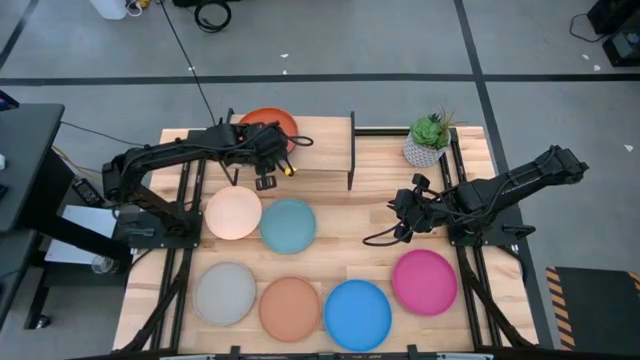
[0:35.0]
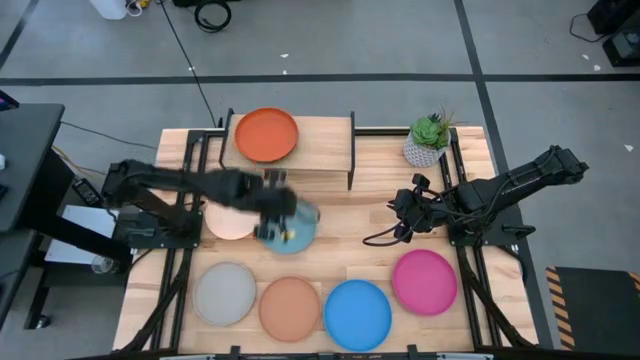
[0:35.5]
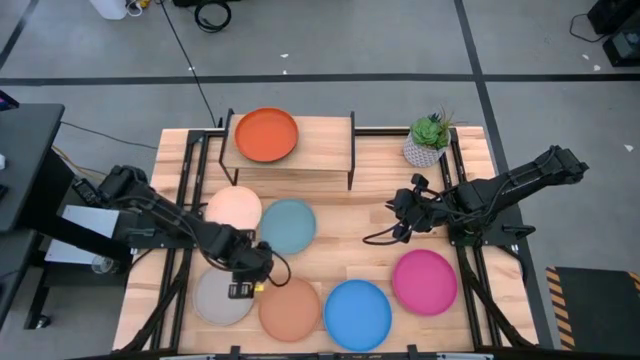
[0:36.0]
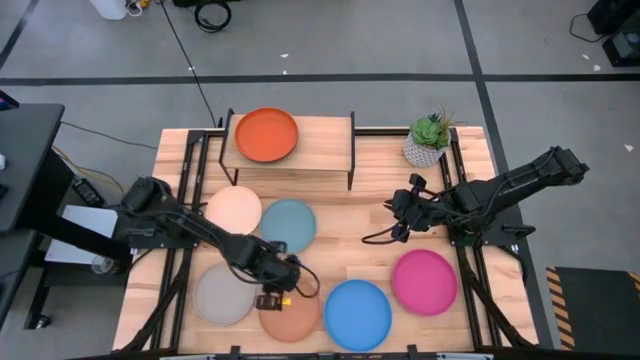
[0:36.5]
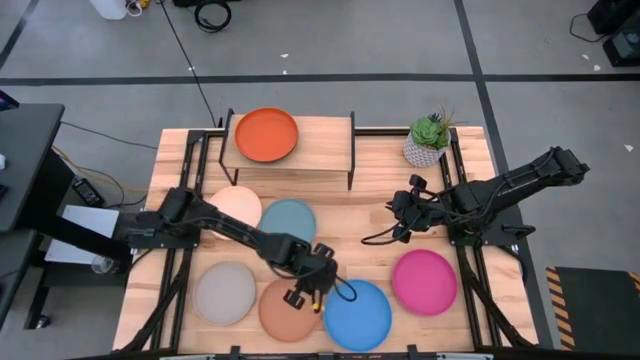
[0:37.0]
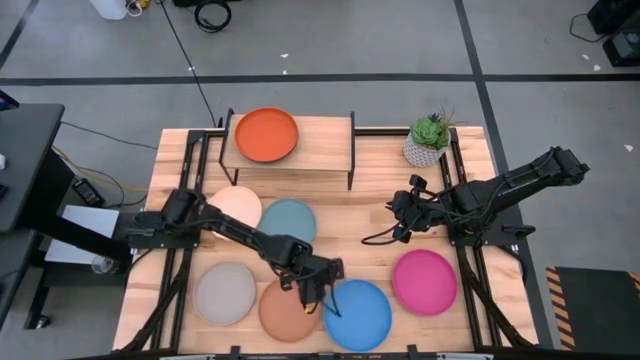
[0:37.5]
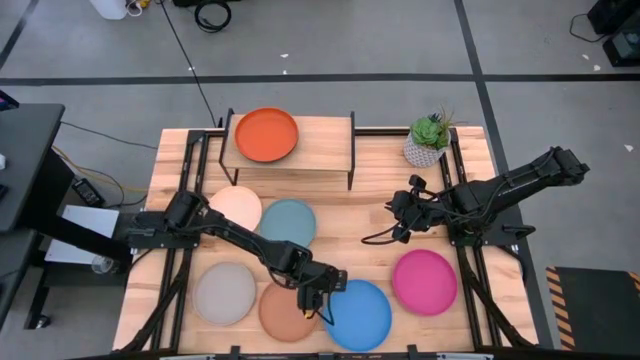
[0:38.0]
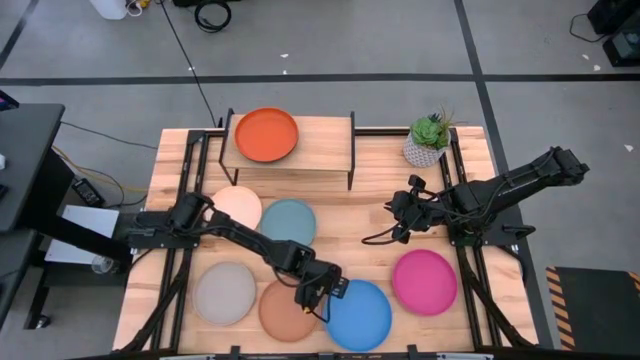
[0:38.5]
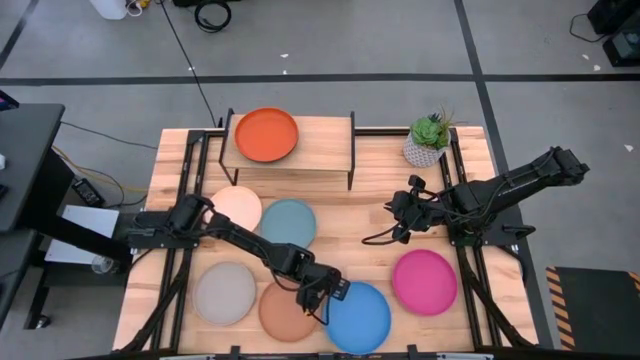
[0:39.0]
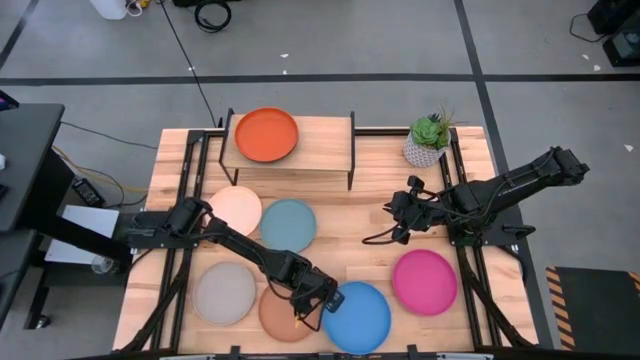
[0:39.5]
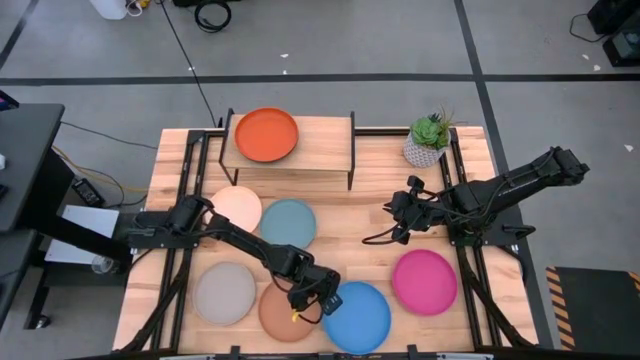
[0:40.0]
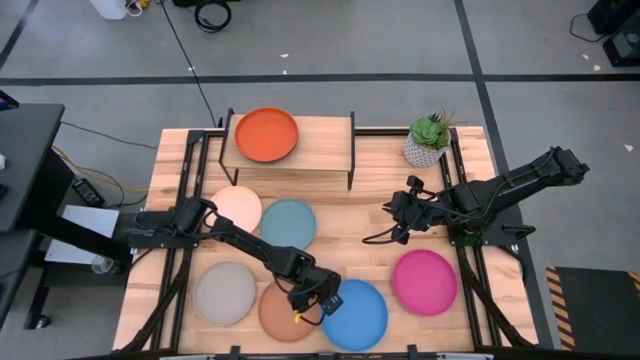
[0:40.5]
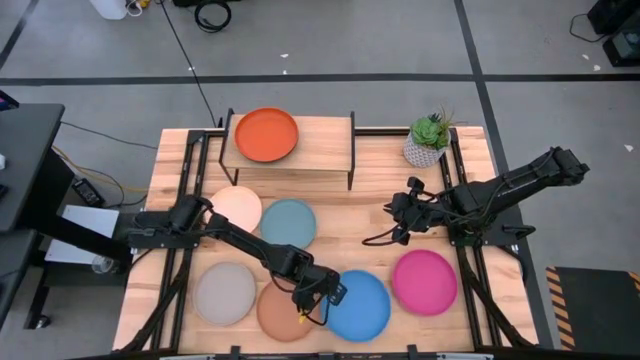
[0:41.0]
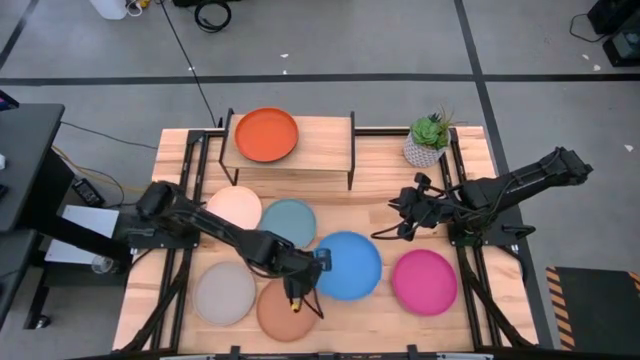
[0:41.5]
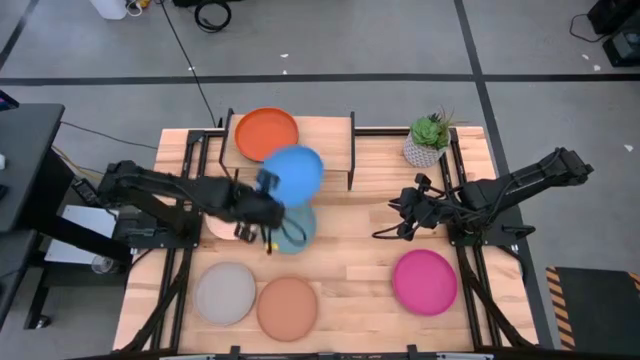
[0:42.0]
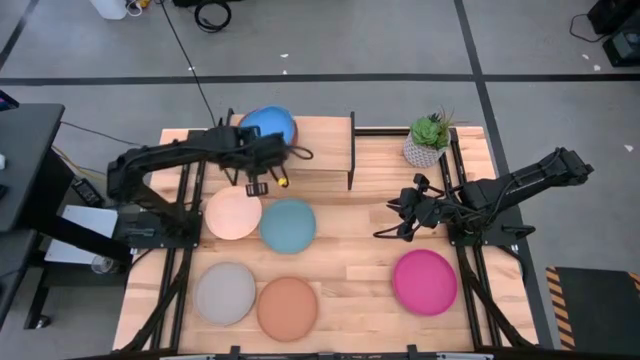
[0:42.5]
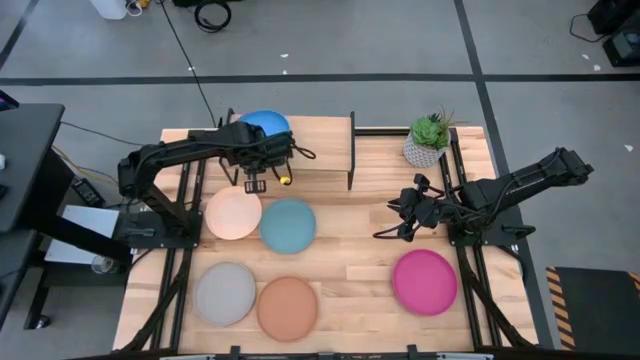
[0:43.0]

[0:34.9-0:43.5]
Task: Place and stack plates onto a shelf
Stack the blue plate on the orange plate on the shelf

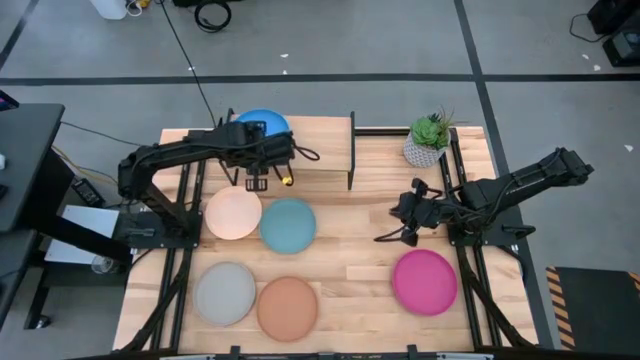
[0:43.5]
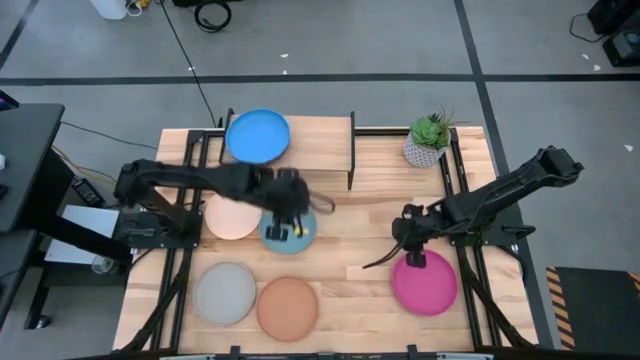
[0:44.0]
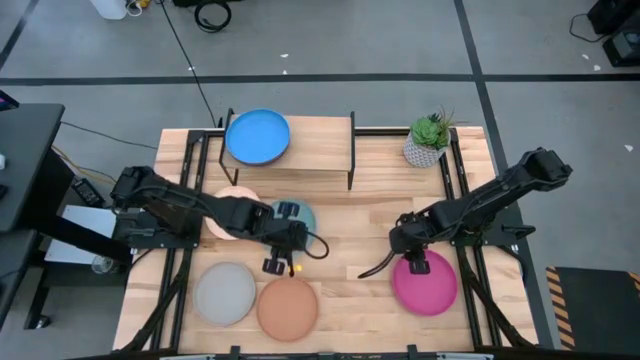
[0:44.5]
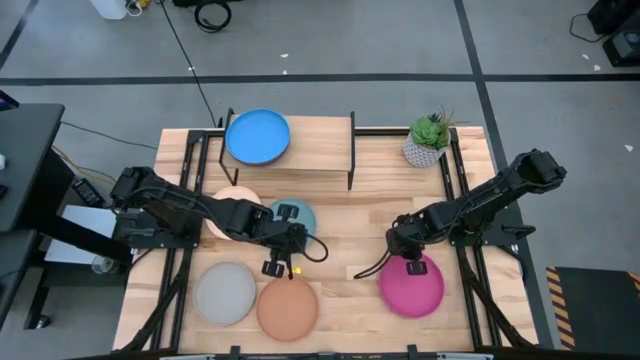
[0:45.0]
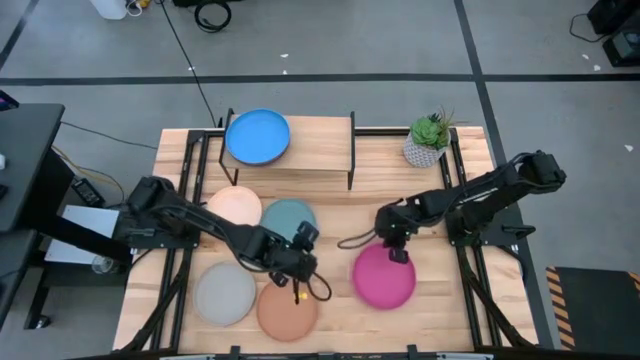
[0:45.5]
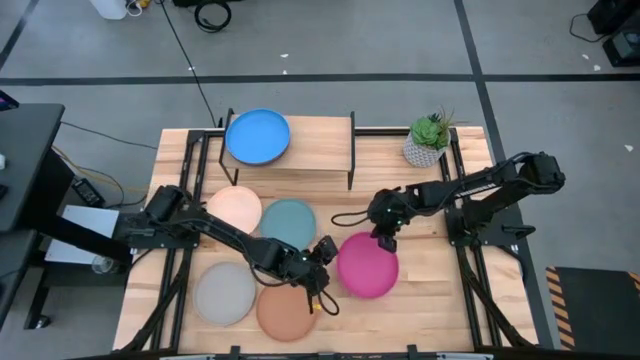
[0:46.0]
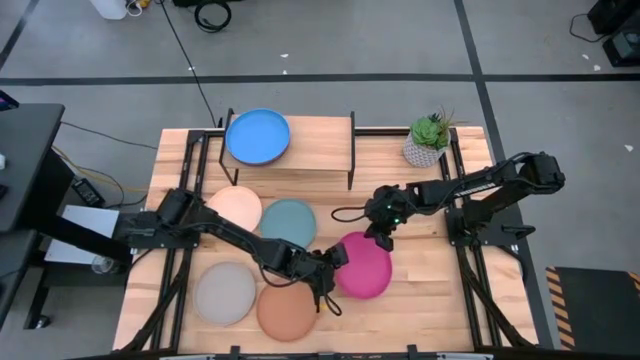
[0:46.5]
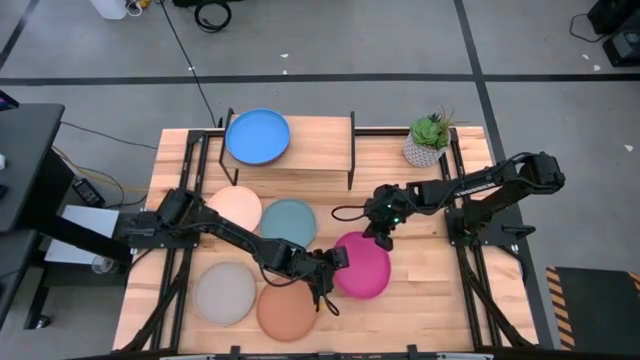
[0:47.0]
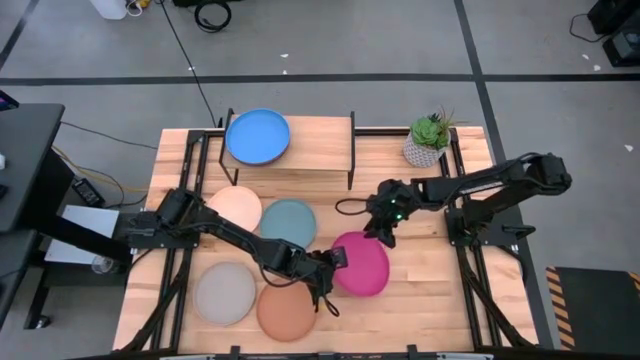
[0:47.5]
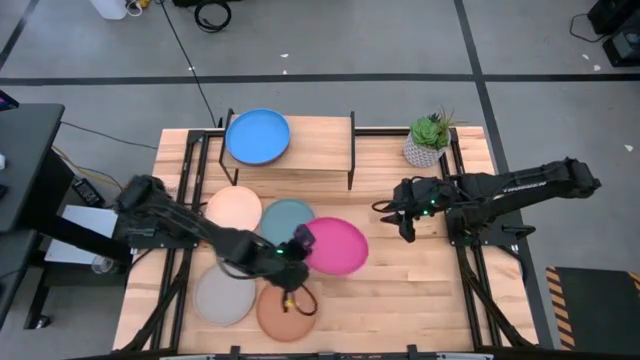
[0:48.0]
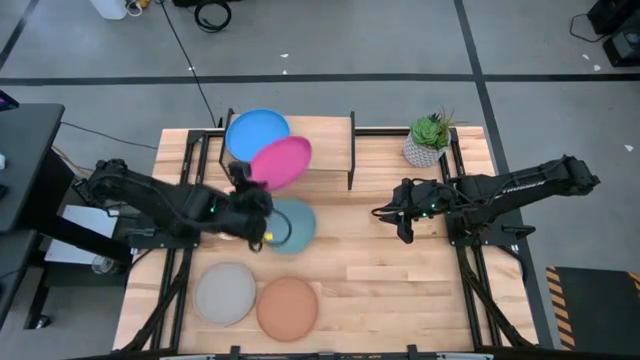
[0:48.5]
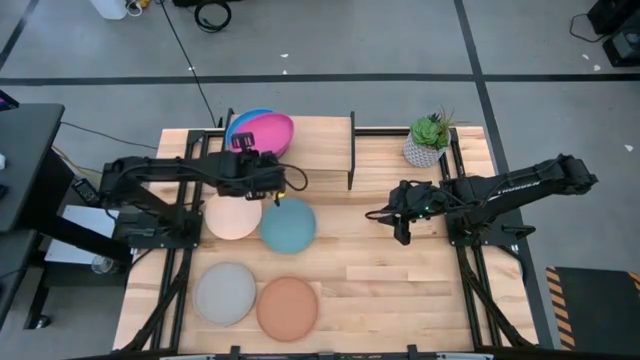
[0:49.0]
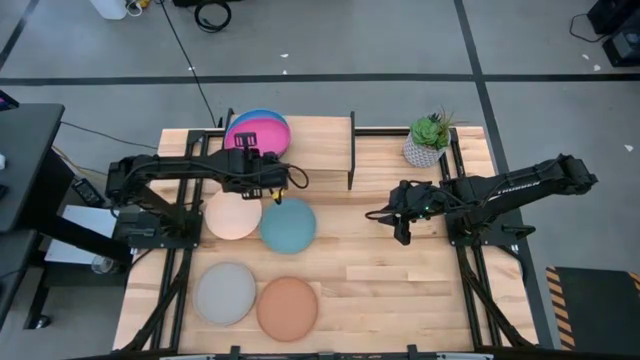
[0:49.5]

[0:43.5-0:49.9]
Stack the pink plate on the blue plate on the shelf

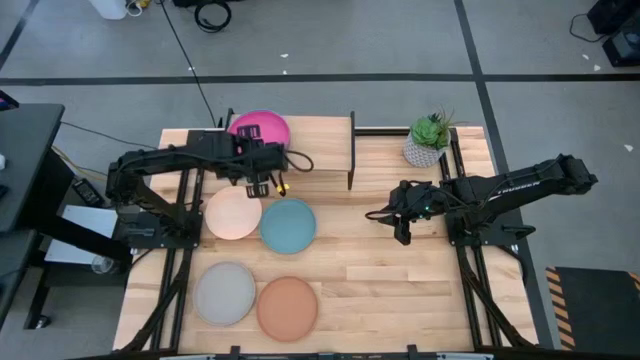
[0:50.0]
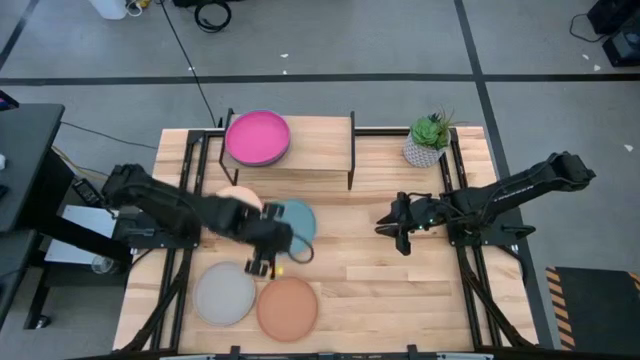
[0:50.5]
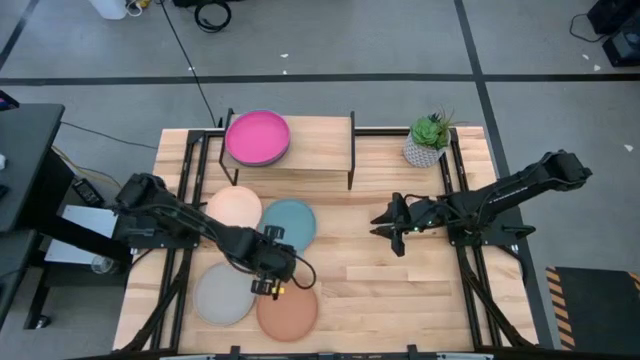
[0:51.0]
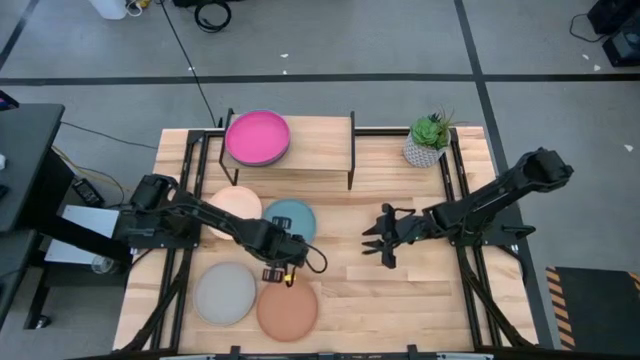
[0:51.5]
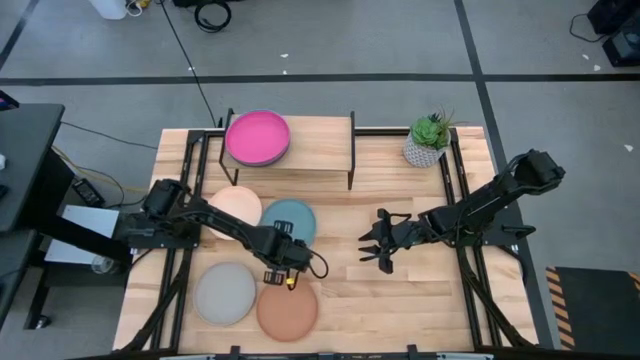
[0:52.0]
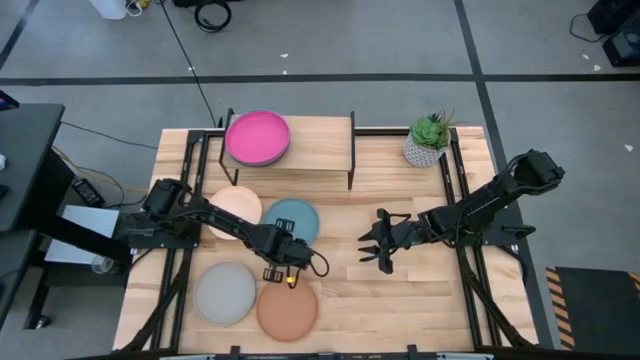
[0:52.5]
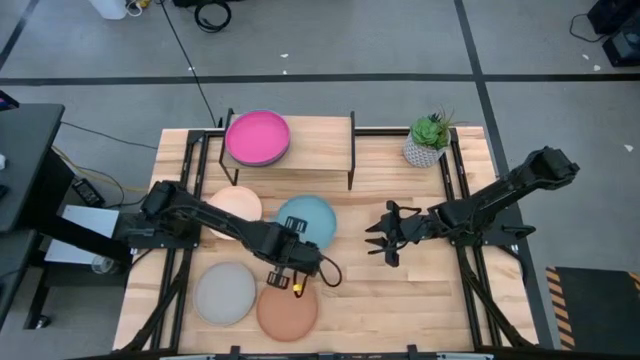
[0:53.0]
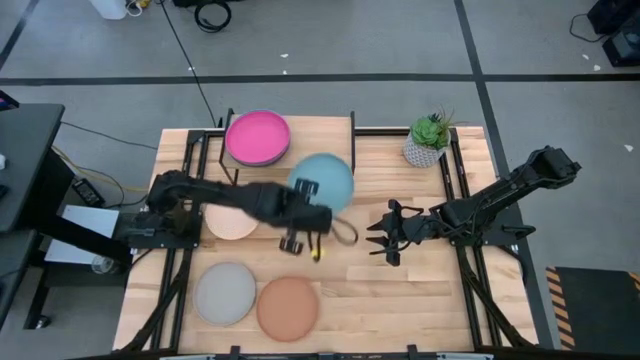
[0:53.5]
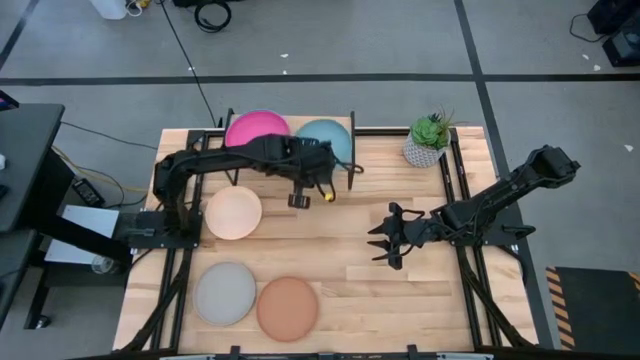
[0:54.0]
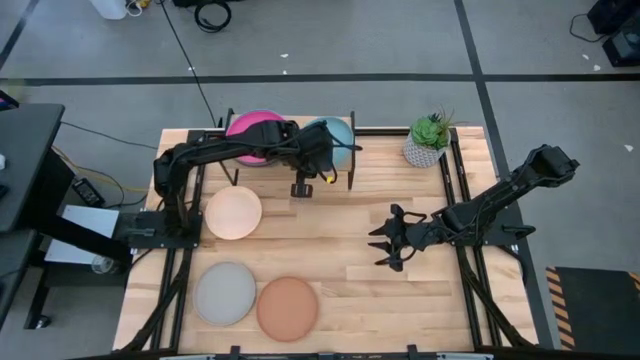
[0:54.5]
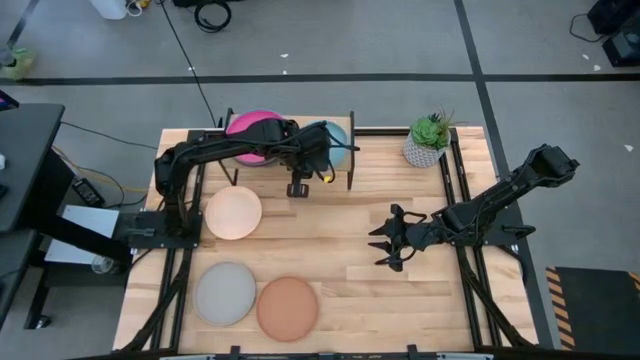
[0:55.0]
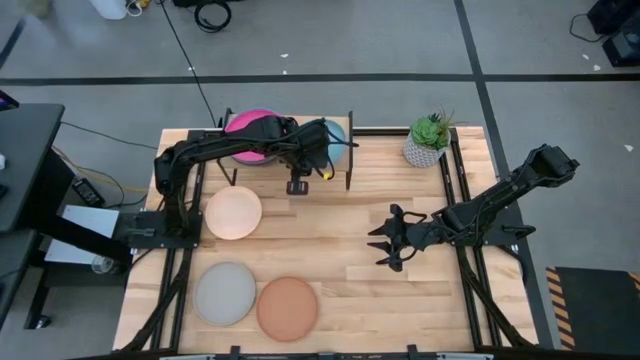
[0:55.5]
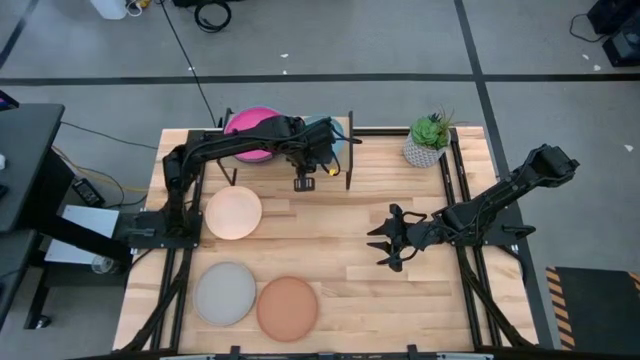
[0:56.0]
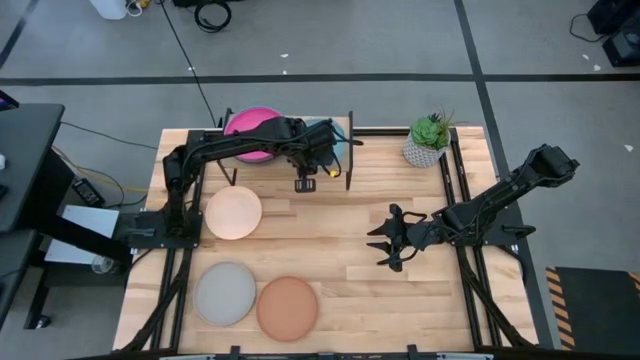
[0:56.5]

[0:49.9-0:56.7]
Put the light blue plate on the shelf
